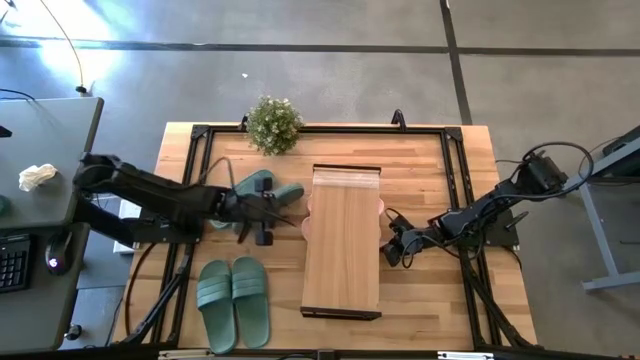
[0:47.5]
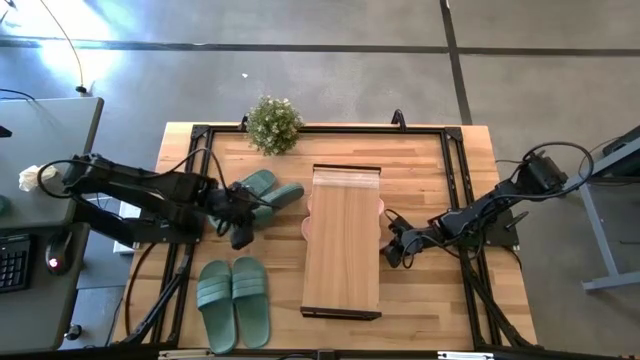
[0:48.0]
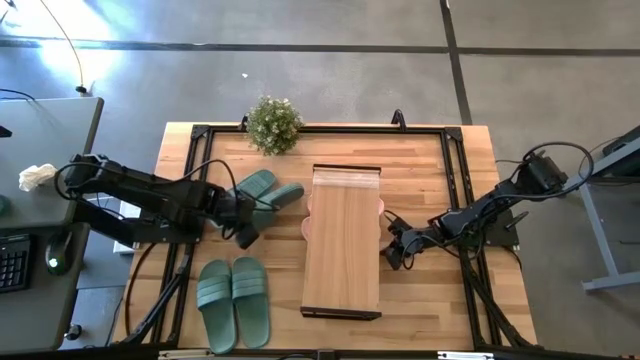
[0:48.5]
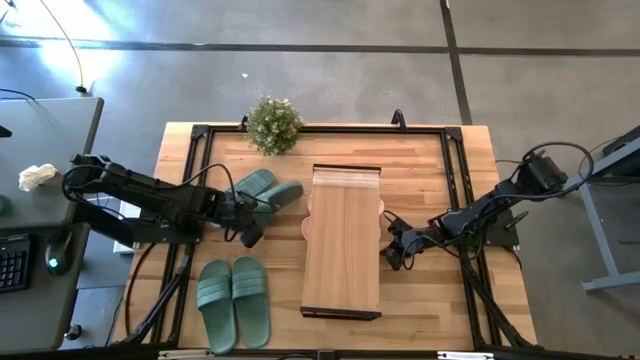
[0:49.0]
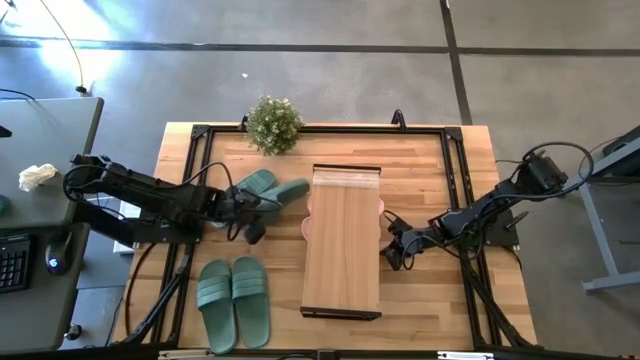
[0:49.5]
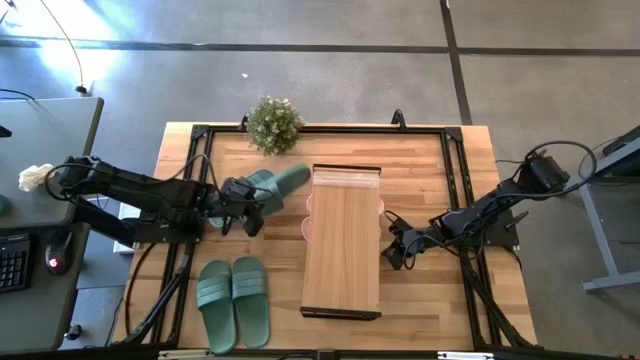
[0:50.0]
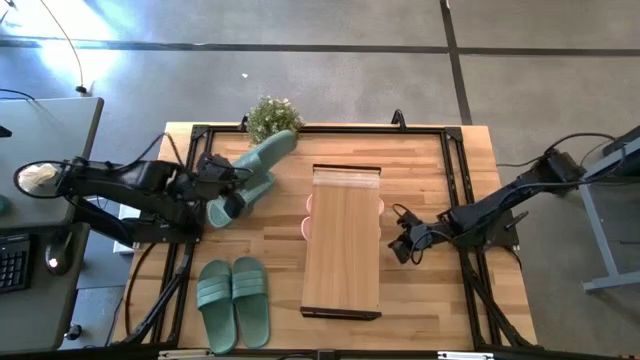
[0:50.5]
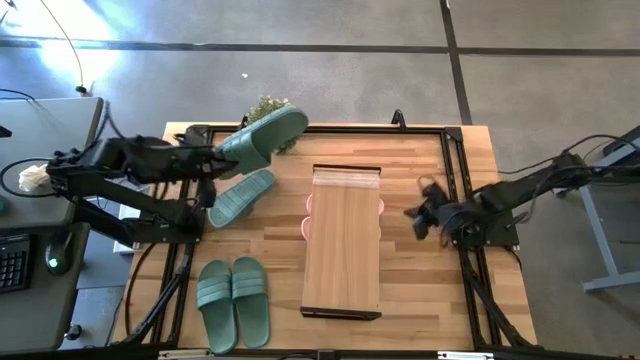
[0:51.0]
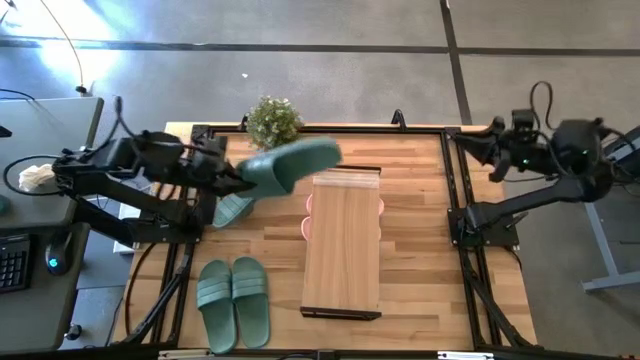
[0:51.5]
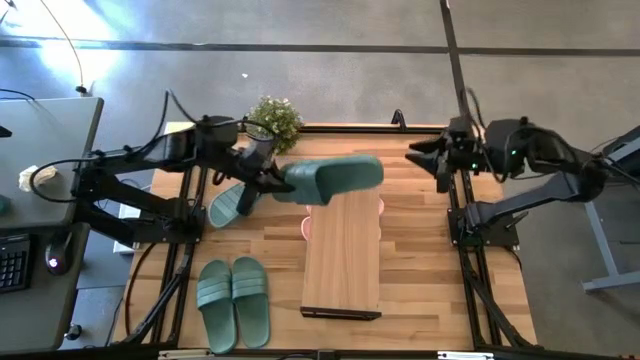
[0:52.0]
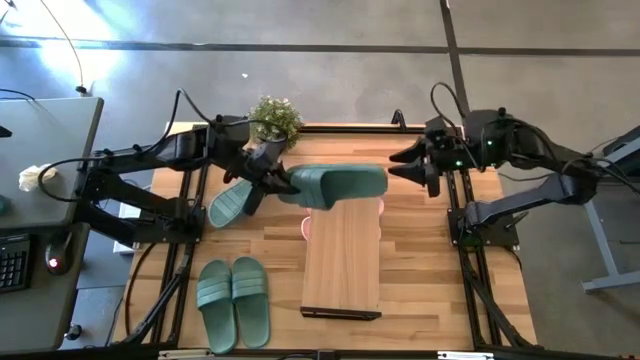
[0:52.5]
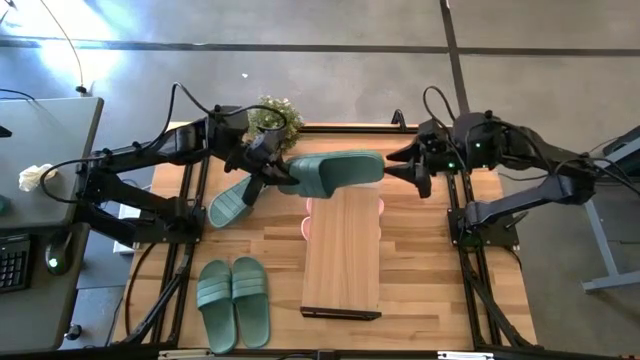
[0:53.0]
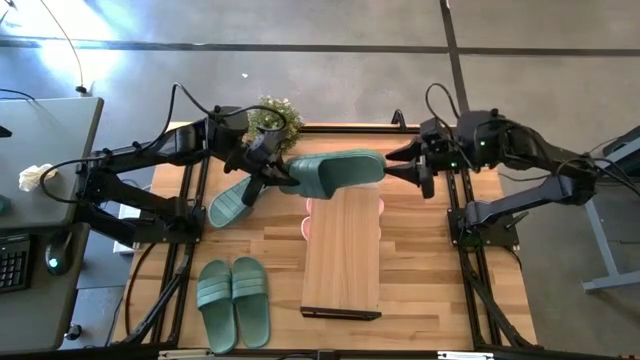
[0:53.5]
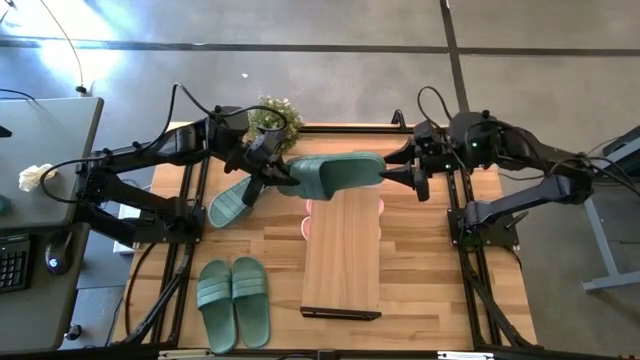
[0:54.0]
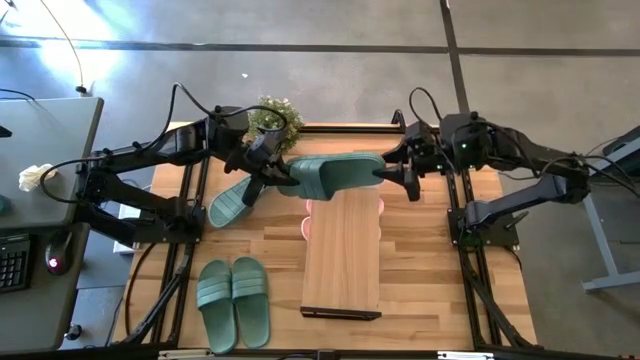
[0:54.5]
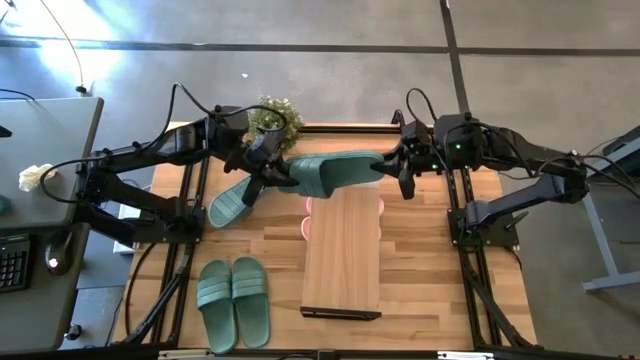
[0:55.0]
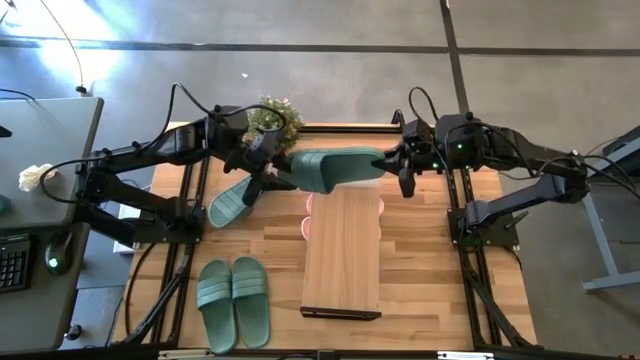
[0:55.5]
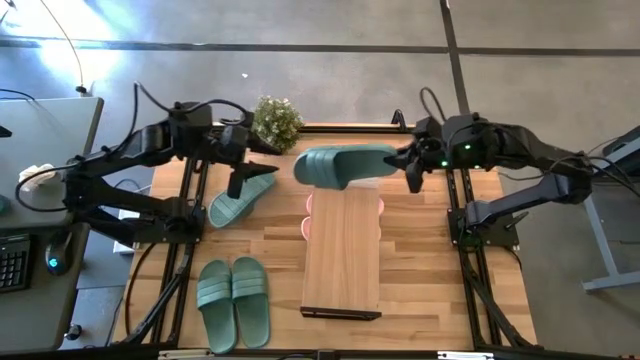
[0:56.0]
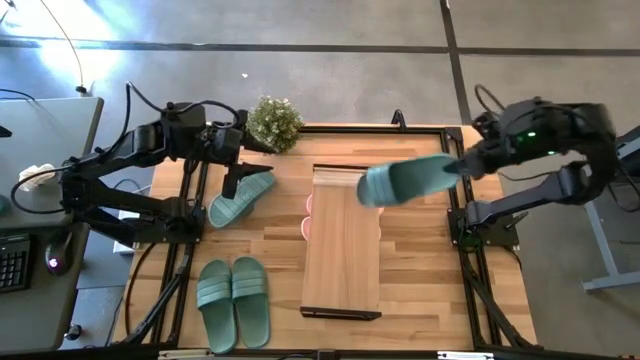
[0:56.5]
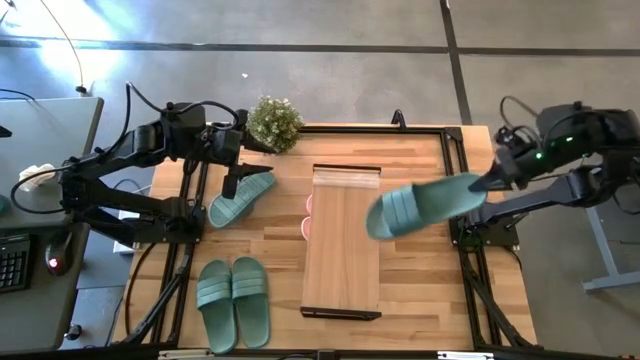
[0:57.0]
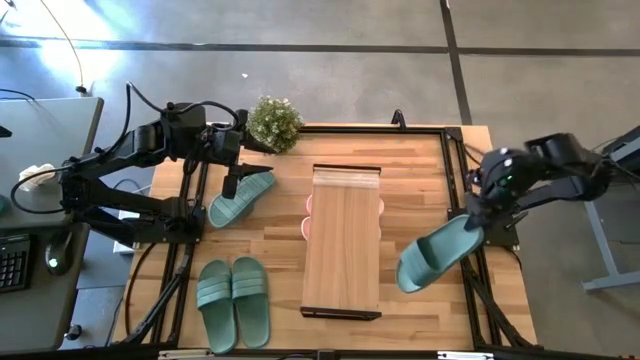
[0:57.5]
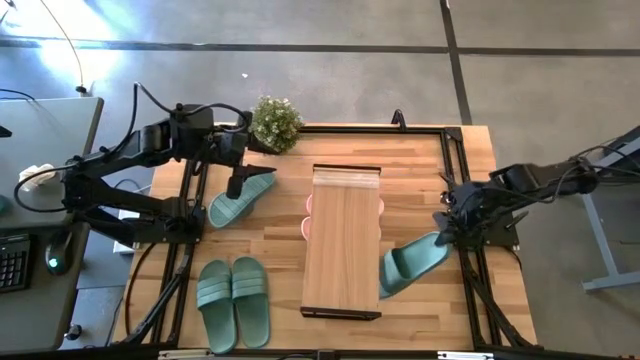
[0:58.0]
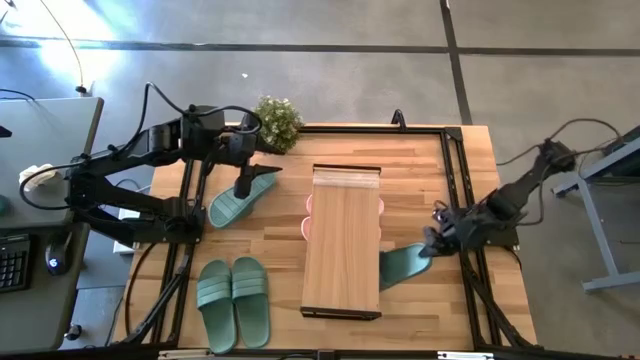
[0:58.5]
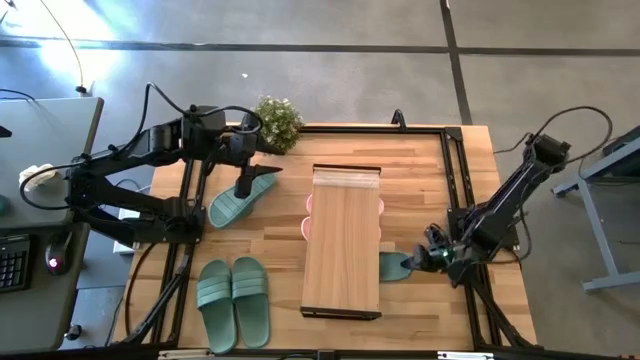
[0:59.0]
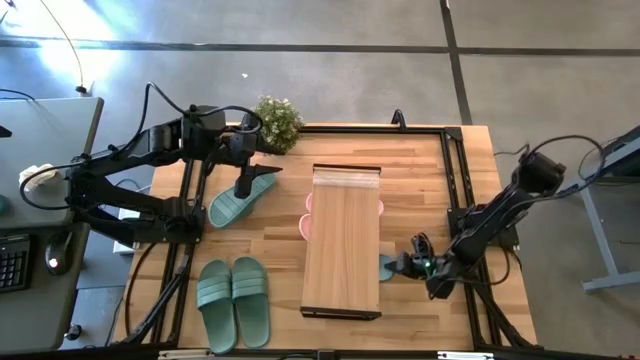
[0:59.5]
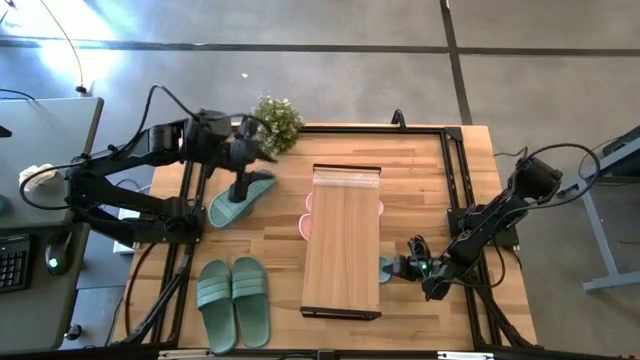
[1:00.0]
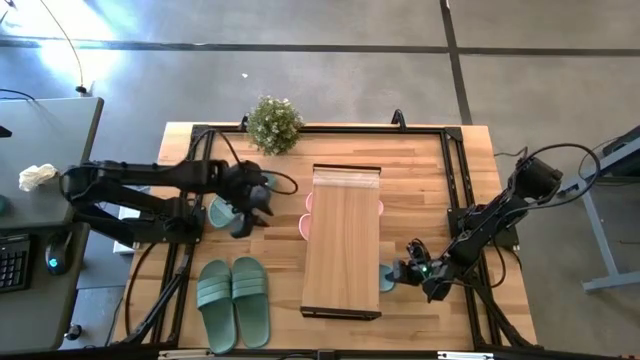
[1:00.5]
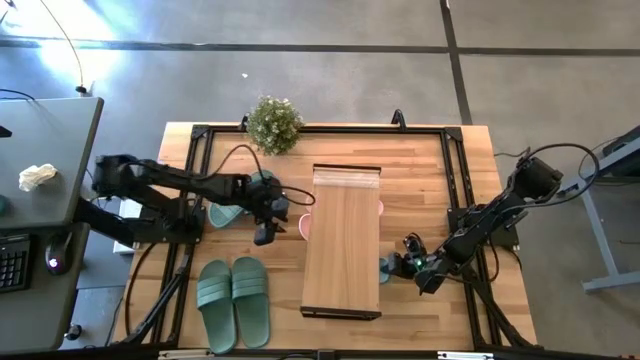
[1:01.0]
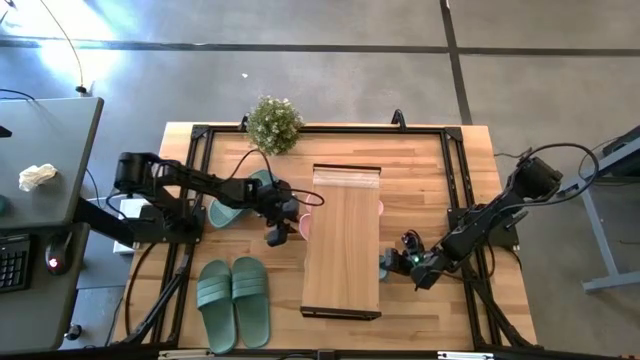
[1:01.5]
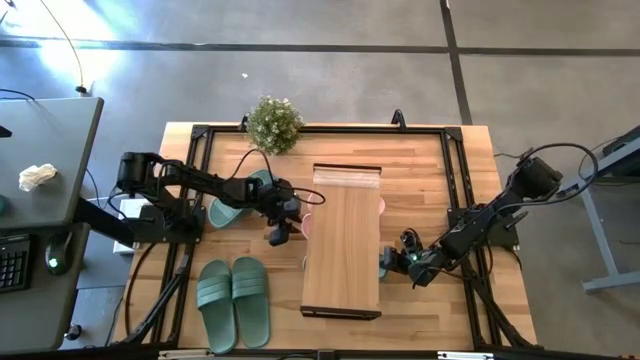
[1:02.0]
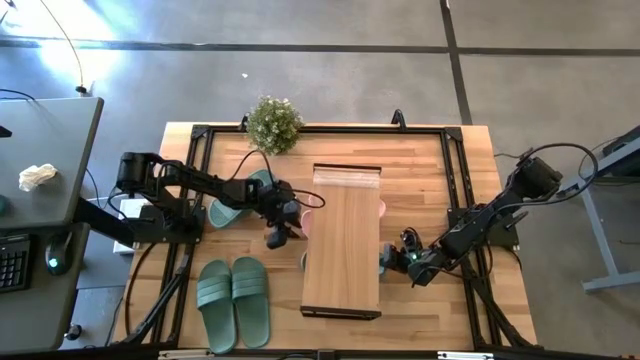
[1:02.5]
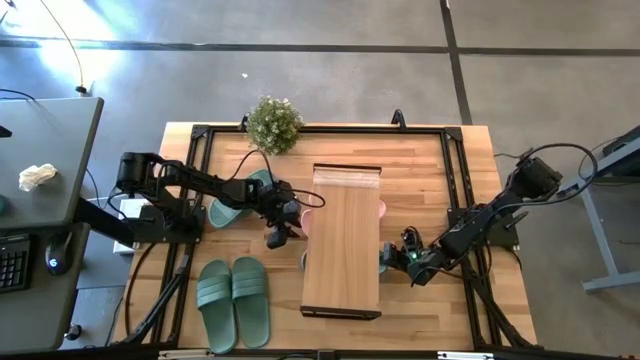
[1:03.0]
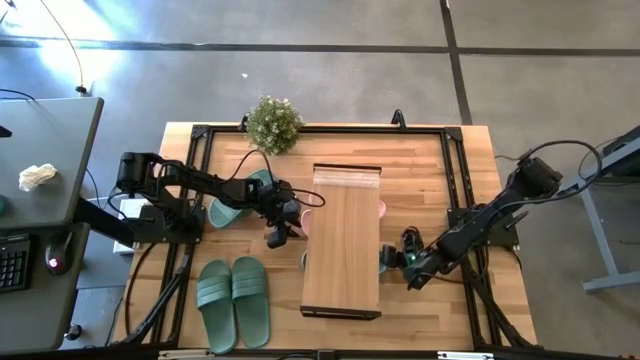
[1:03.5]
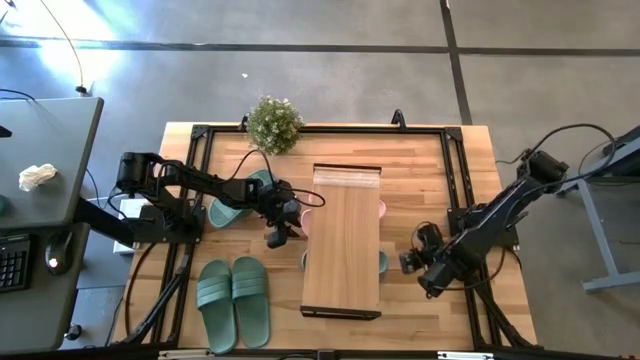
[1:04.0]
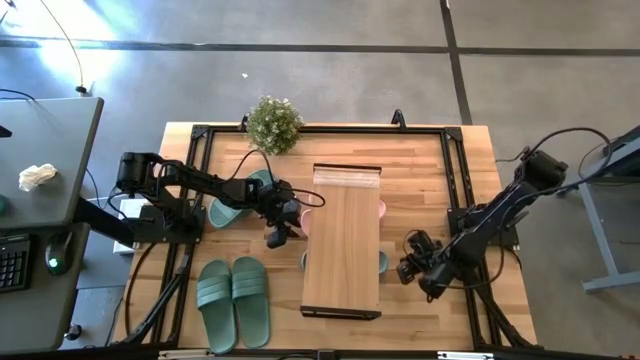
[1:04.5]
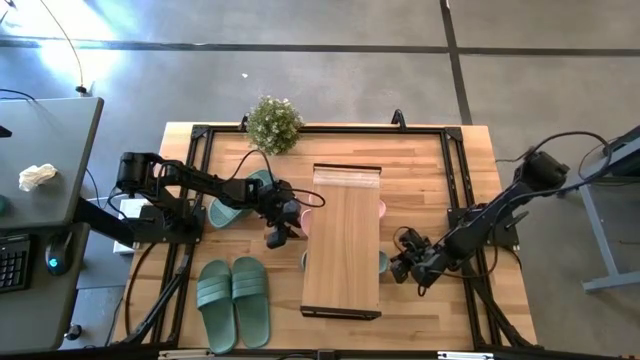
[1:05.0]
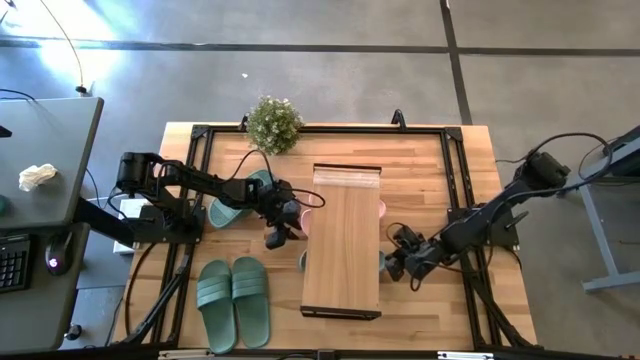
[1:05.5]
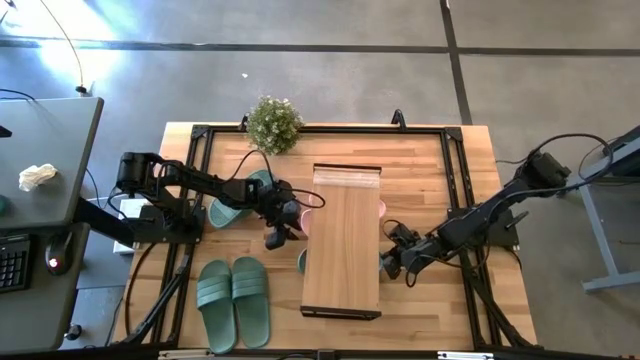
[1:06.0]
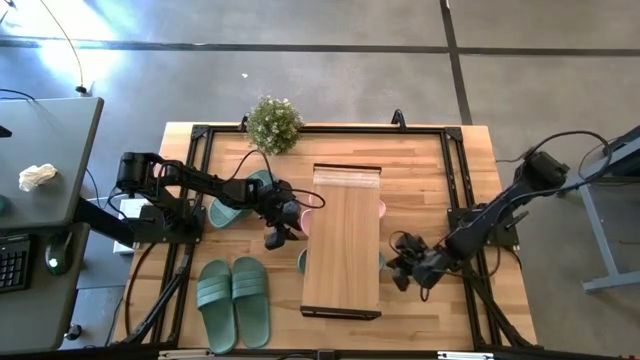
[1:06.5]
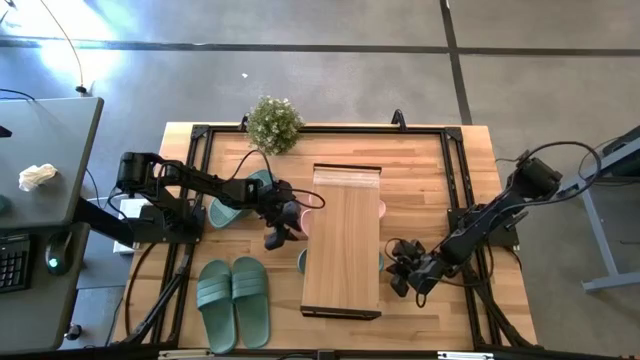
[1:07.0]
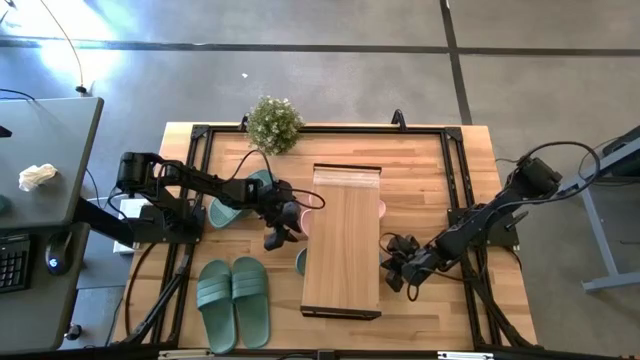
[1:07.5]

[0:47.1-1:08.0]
Task: Pick and place slides into the shelf
Put the top right green slide under the shelf
